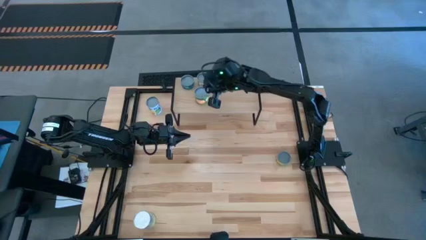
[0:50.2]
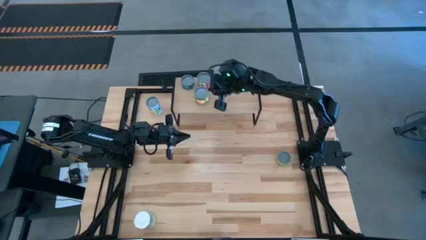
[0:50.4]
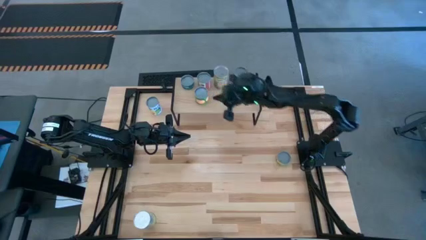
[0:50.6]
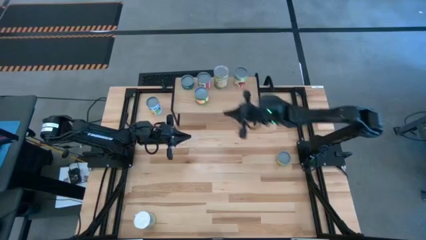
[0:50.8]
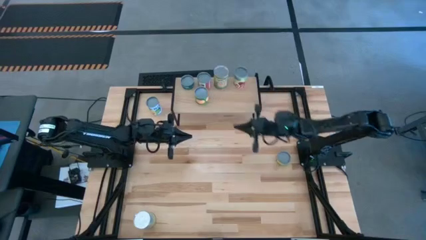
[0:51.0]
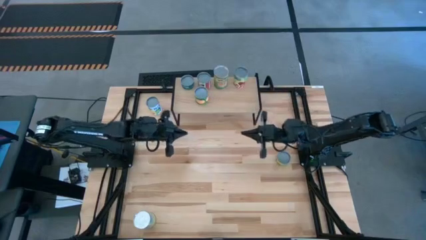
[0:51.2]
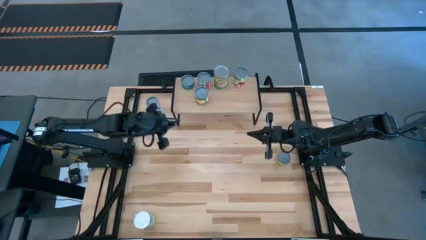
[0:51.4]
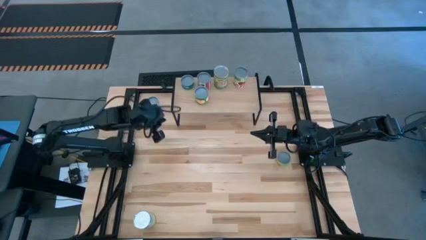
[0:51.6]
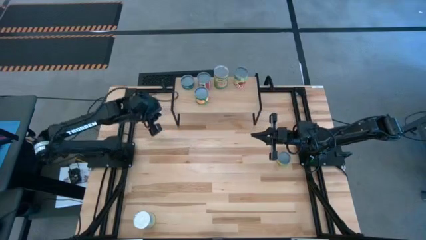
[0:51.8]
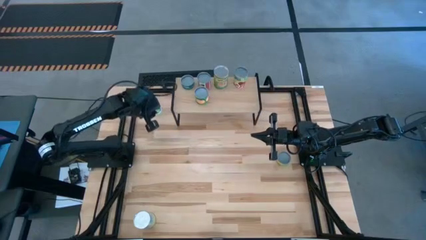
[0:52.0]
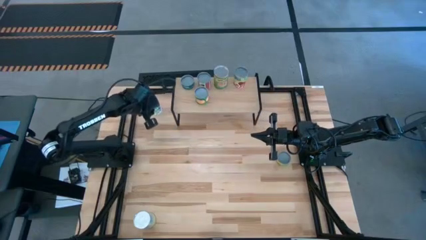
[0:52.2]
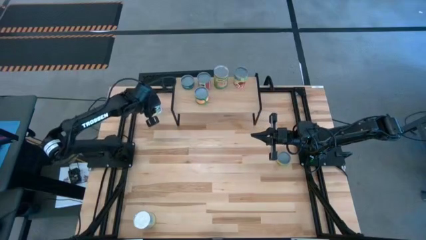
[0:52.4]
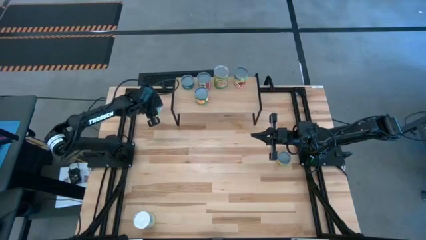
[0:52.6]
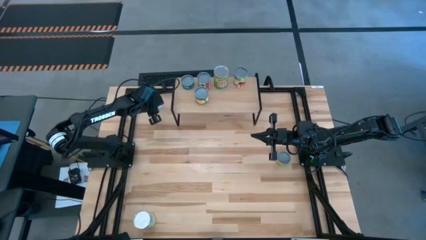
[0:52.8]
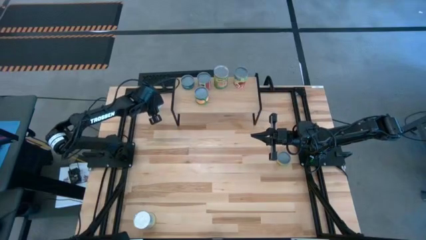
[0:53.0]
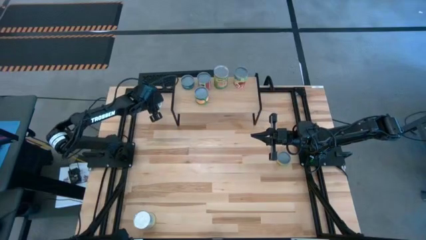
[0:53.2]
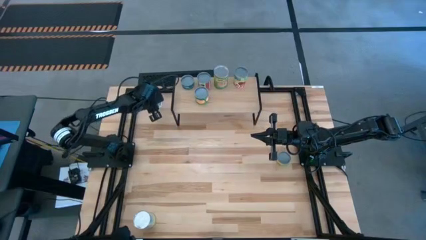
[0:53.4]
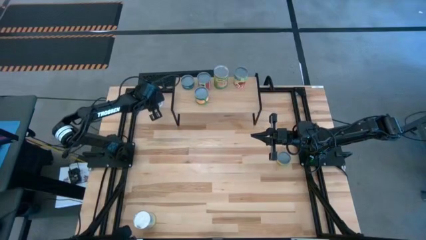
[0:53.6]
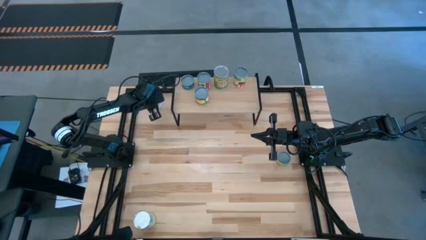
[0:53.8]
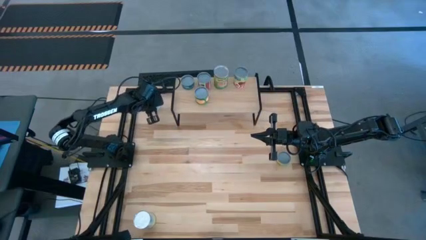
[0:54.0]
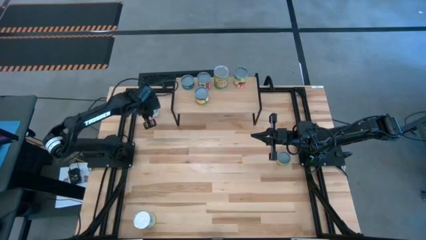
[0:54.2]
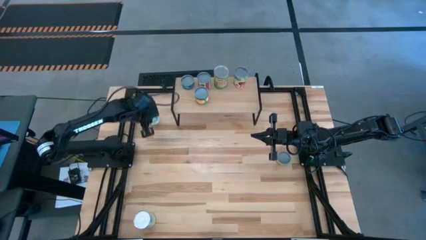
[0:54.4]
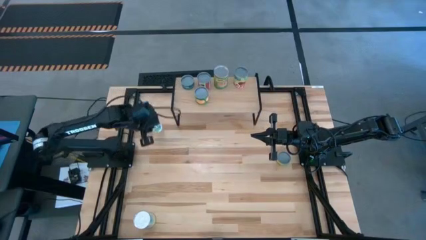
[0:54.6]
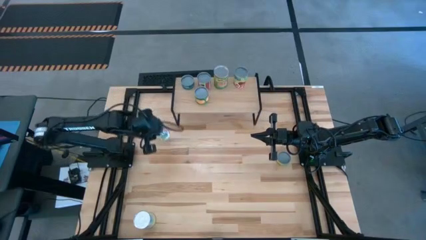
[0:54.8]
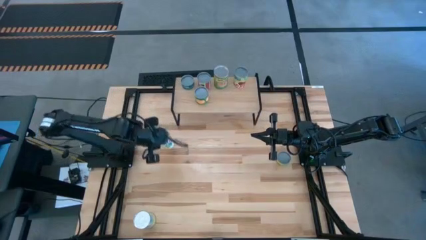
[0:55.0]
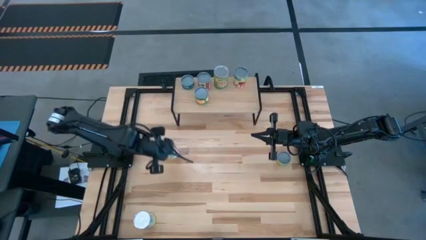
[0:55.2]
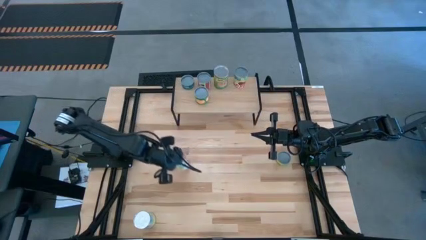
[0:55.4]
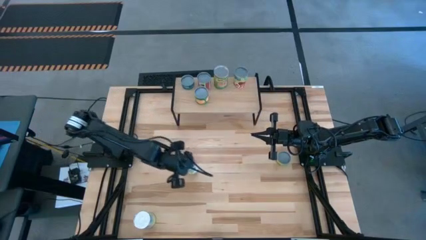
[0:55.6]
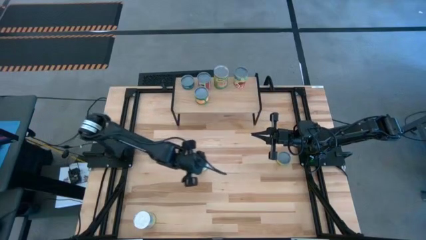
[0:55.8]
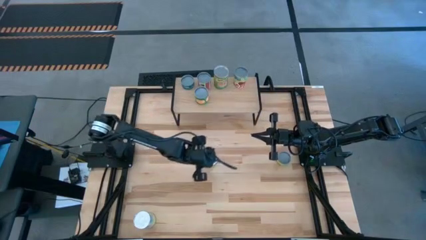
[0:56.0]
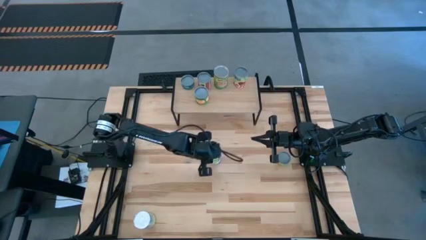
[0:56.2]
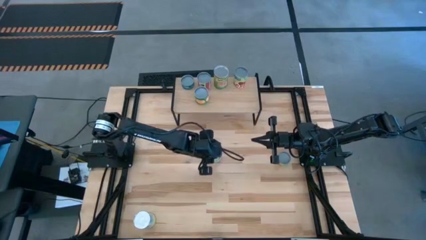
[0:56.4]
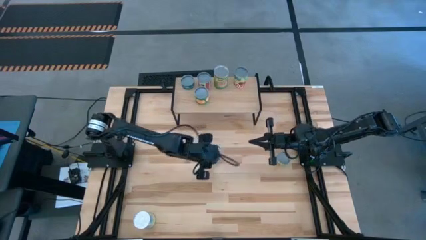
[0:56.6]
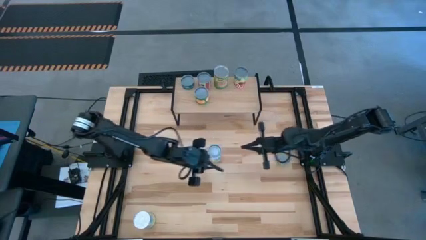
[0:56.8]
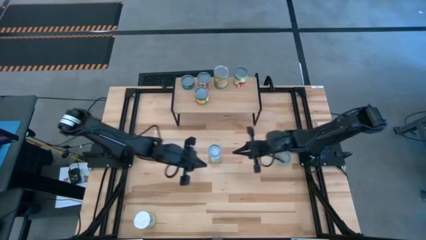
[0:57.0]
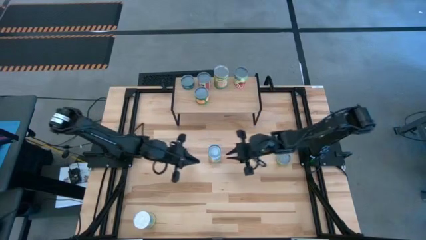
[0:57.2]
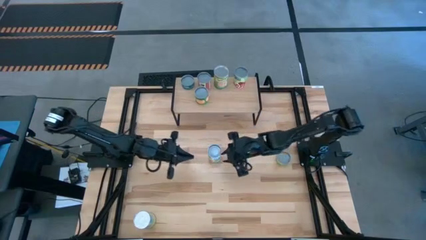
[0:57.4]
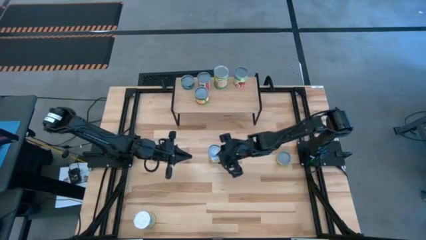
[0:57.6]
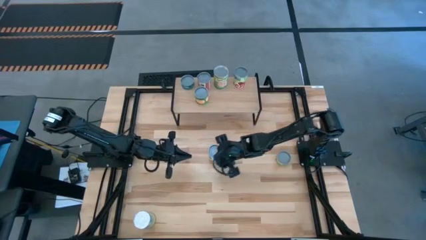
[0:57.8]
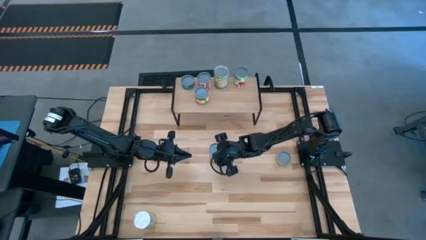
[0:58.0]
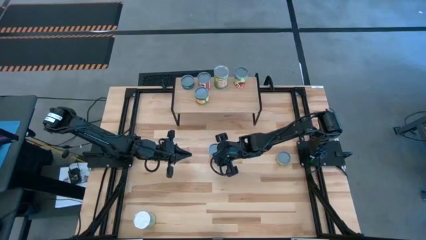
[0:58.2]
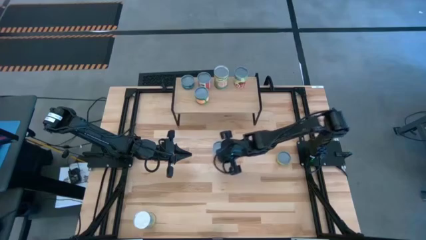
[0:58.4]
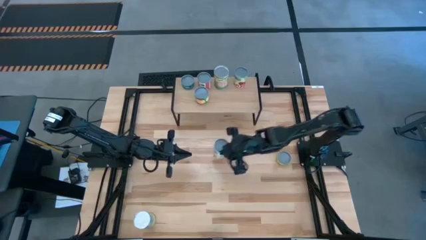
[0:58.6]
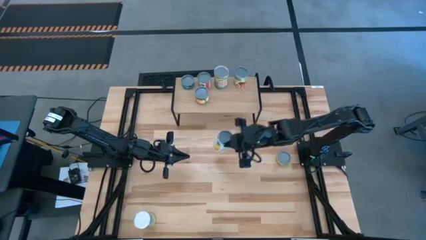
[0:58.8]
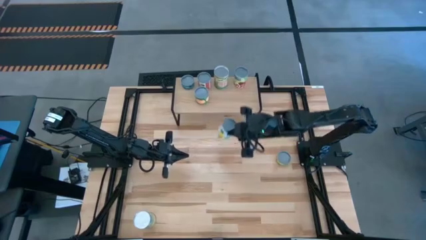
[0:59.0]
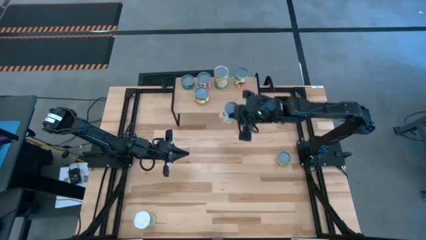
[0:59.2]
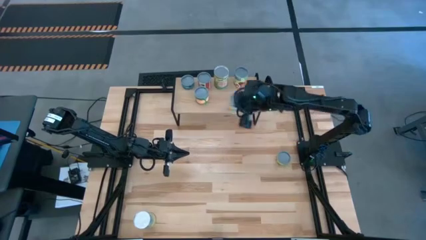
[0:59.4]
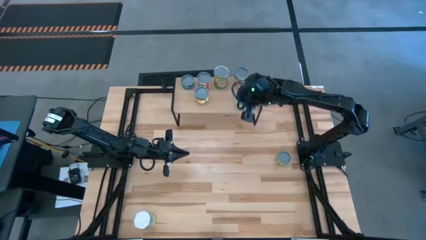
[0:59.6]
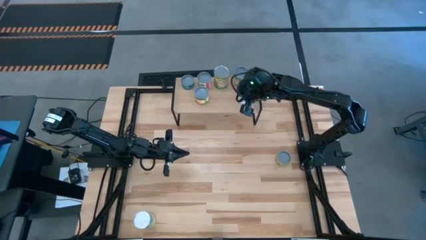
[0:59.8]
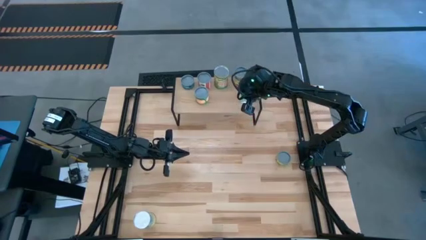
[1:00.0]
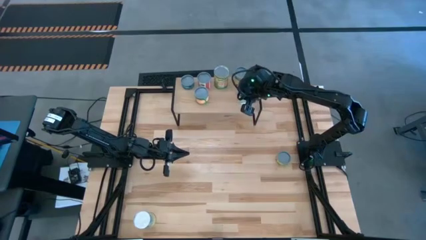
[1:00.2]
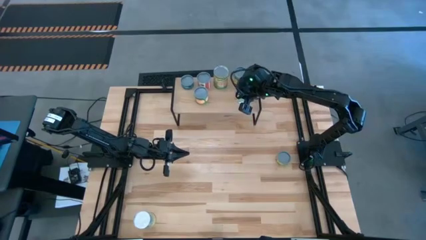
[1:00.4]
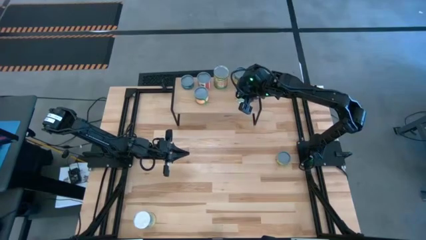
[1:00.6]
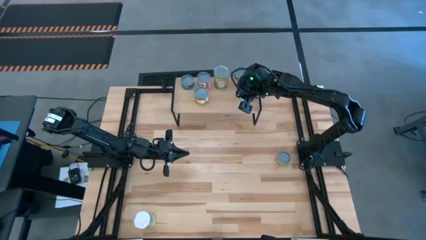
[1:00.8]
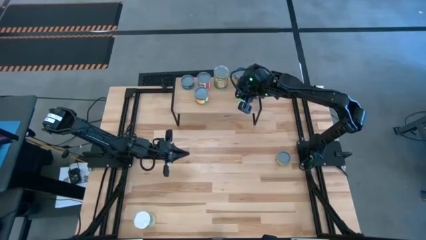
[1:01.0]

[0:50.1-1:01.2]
Task: Pick and place cans onto a shelf
Put the canned mixed fruit on the shelf

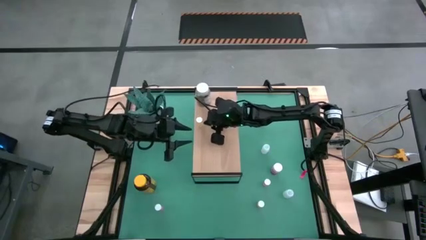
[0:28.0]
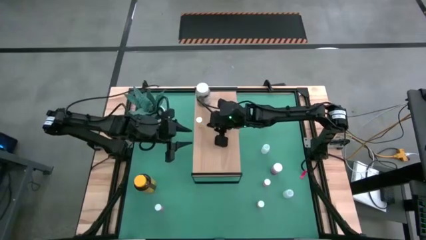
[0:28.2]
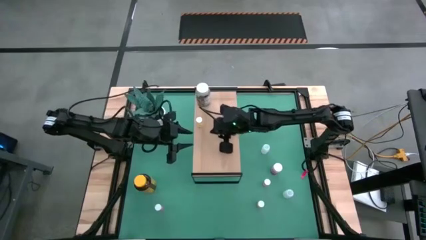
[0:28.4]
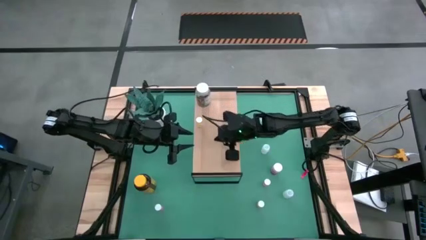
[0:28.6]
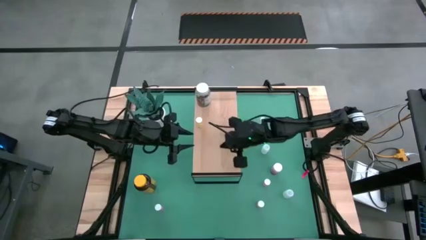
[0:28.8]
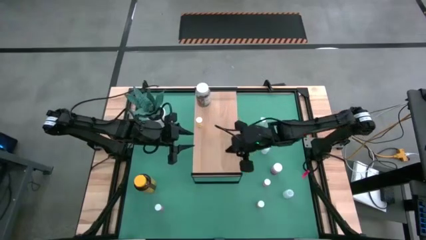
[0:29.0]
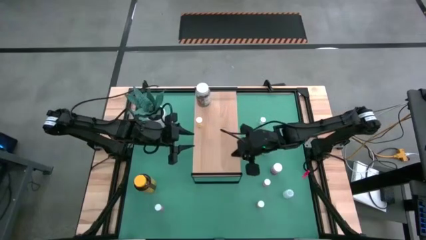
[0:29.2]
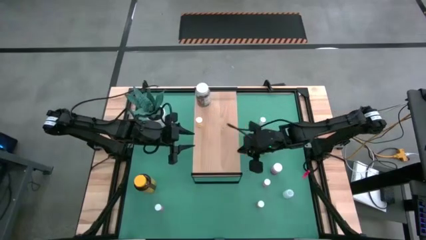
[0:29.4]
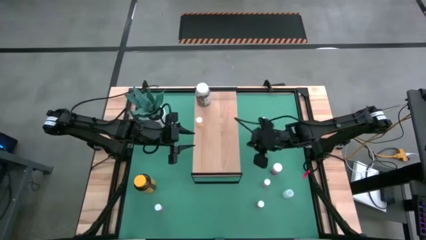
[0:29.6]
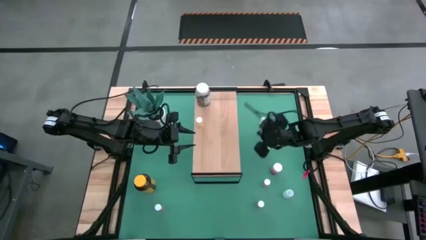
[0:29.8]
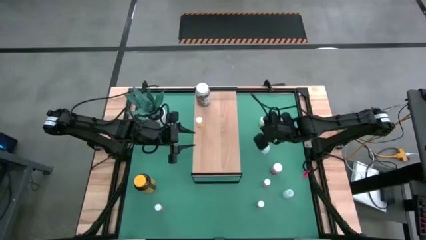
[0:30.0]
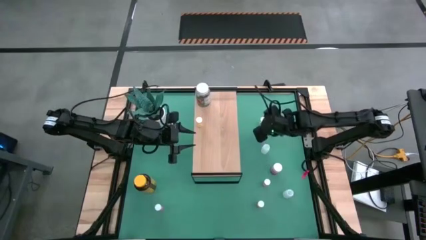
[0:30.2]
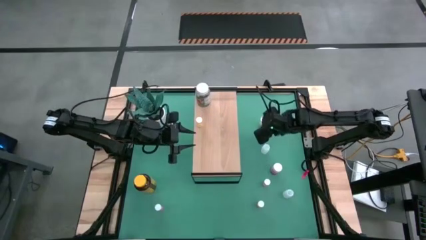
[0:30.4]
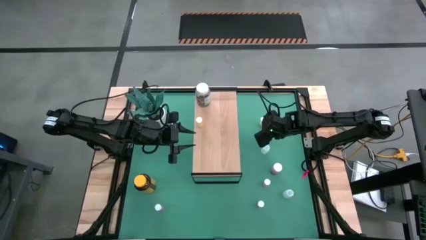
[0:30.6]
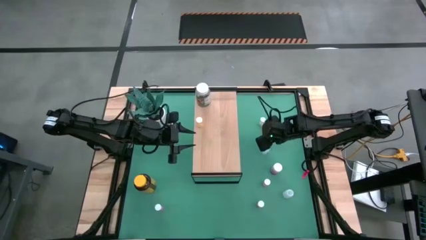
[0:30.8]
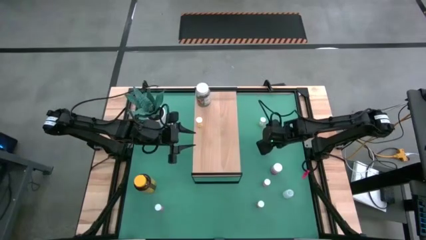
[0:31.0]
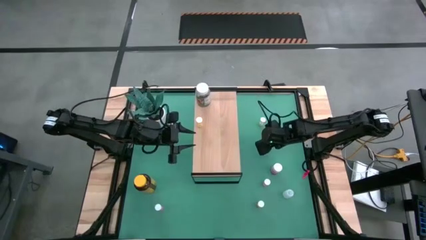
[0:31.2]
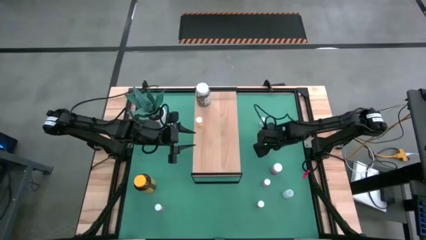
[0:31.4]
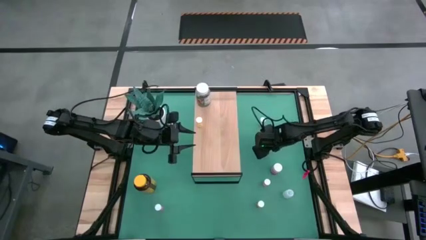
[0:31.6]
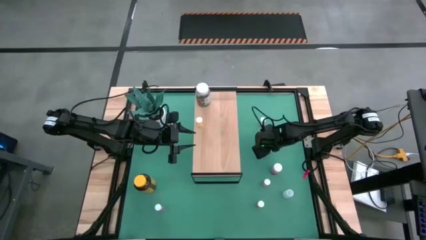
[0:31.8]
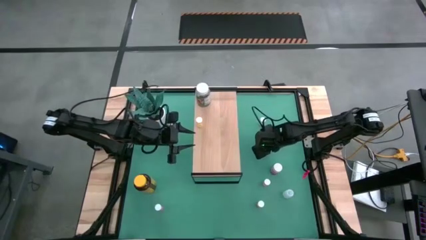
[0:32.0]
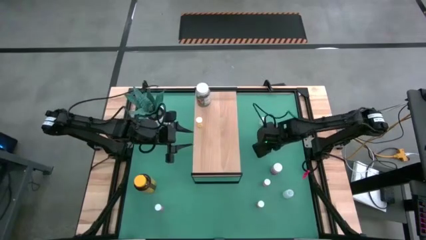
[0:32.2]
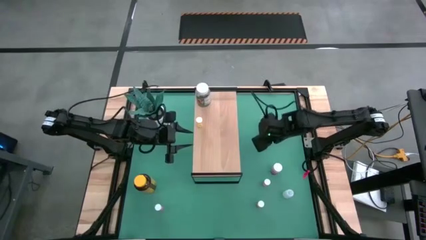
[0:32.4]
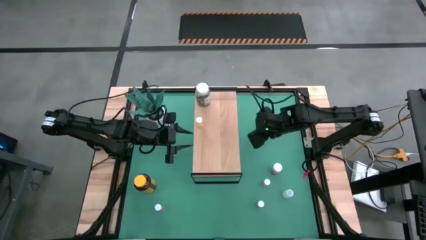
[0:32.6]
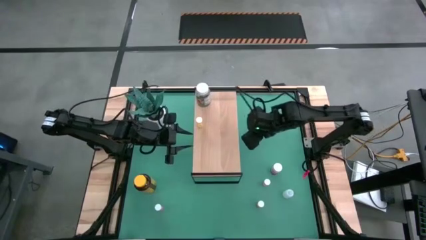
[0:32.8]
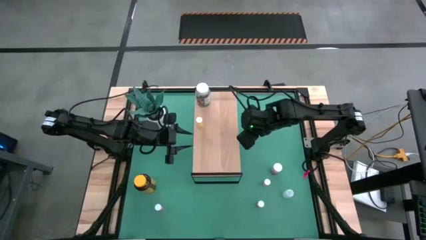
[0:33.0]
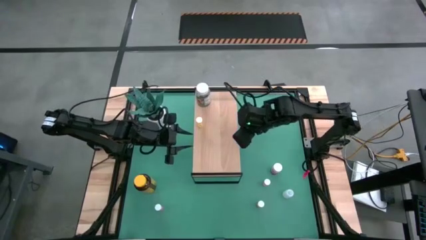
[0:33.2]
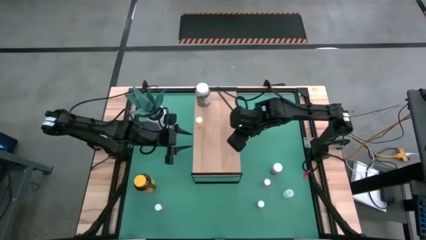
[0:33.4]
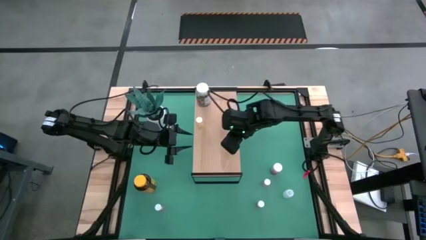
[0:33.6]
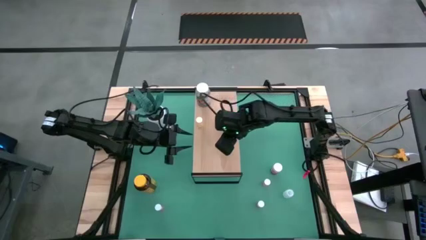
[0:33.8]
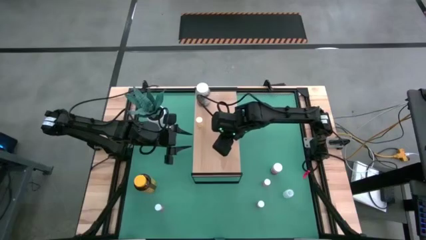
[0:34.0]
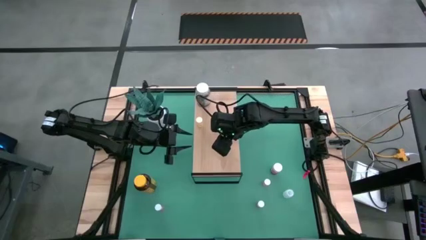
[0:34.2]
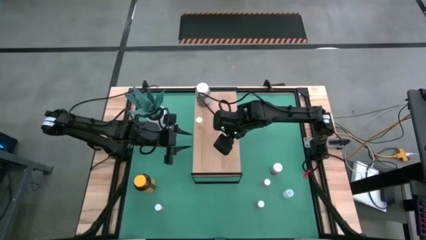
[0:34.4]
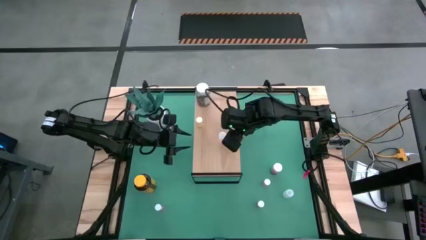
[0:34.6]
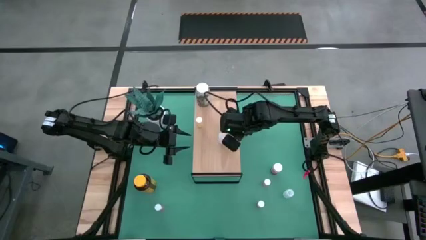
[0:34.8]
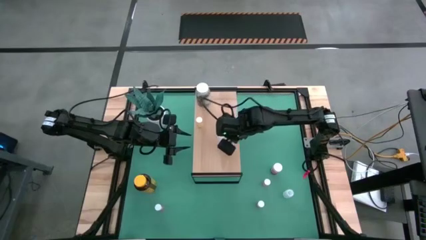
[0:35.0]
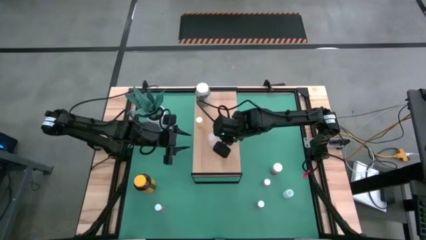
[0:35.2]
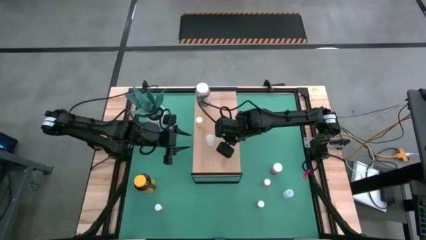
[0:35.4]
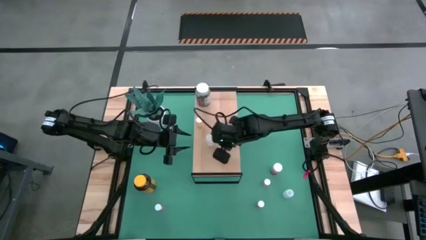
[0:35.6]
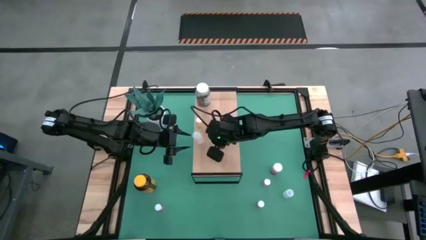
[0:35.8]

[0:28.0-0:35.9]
Task: Pick and place medicine bottles onto shelf by color
Put the white pill bottle on the shelf
